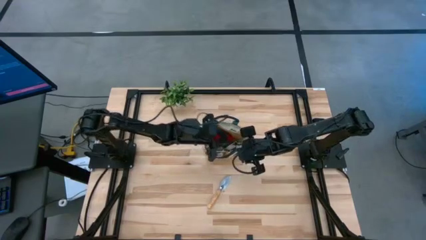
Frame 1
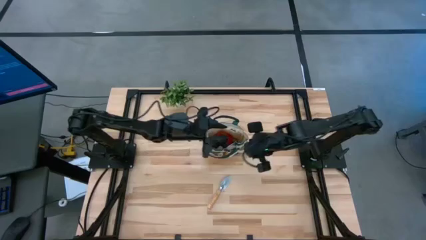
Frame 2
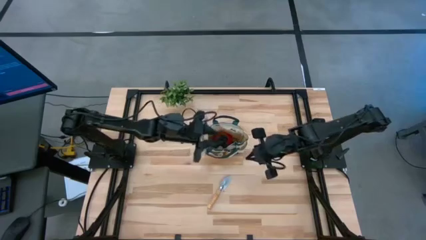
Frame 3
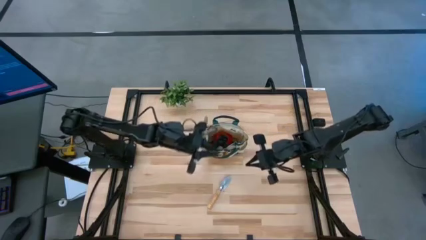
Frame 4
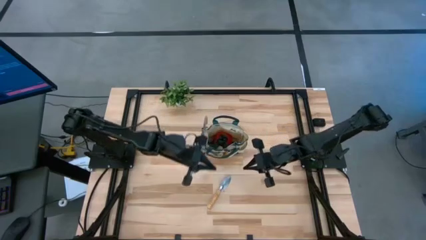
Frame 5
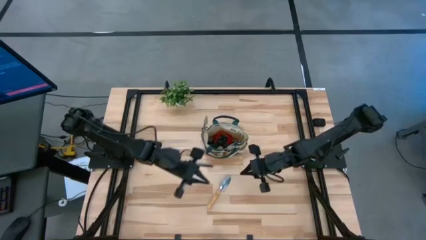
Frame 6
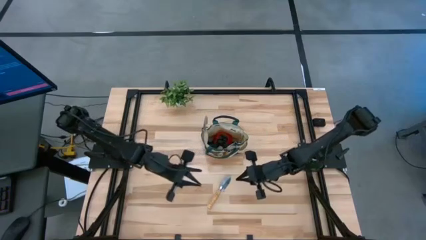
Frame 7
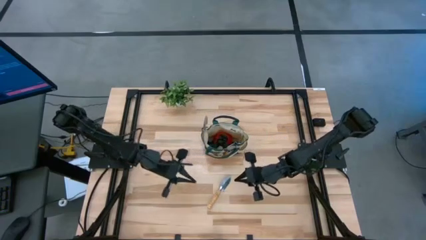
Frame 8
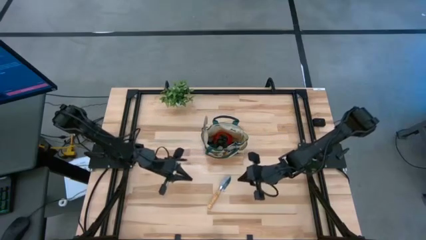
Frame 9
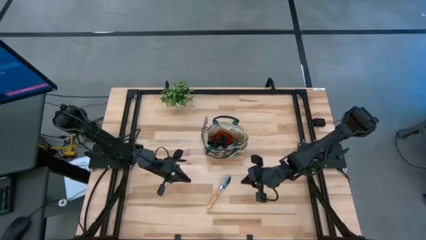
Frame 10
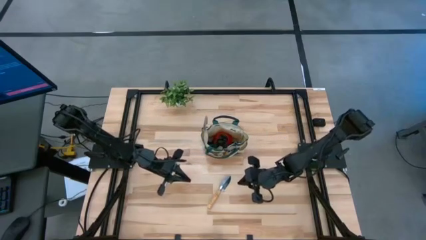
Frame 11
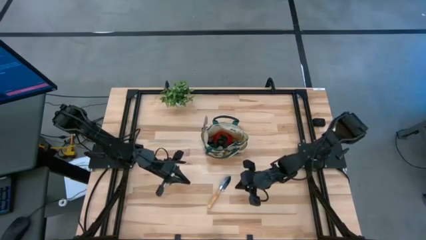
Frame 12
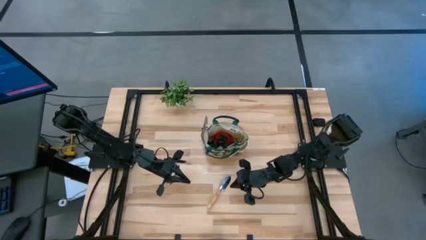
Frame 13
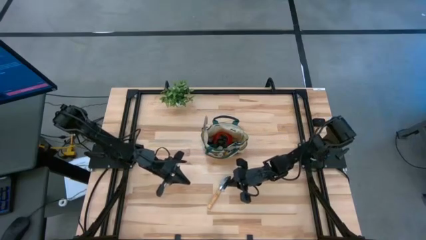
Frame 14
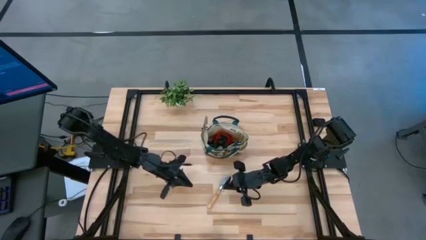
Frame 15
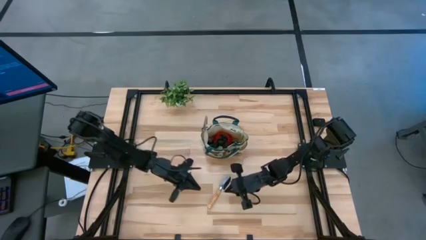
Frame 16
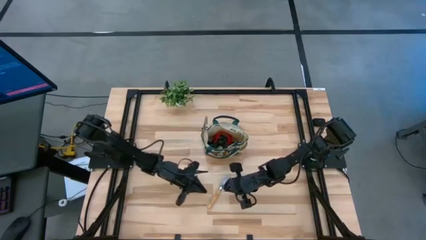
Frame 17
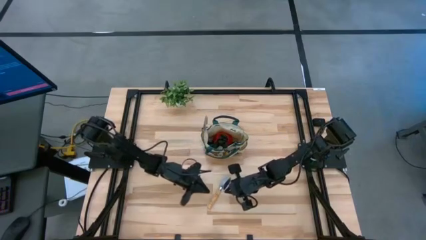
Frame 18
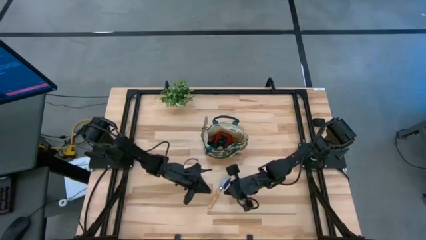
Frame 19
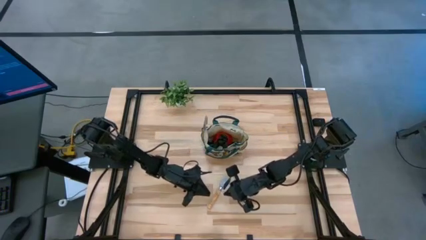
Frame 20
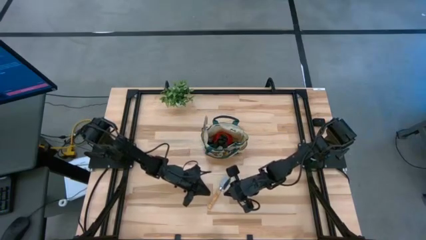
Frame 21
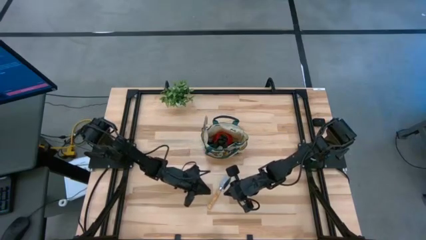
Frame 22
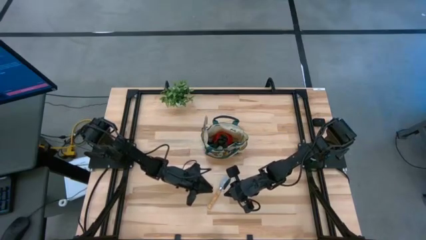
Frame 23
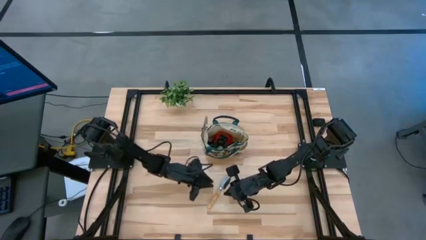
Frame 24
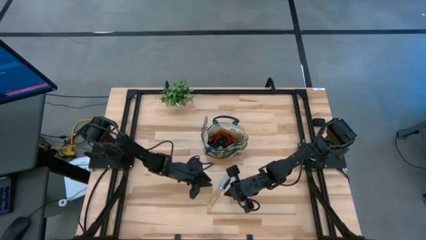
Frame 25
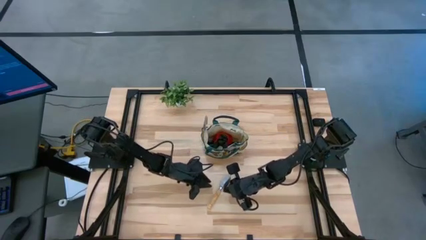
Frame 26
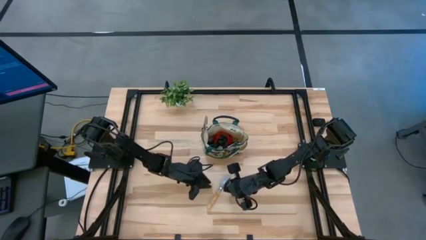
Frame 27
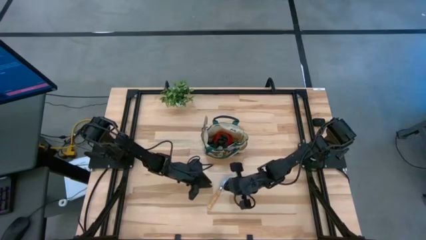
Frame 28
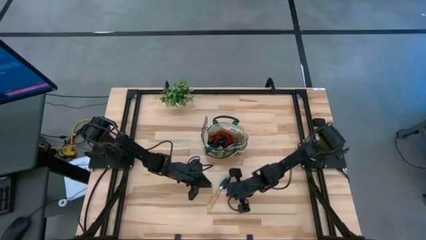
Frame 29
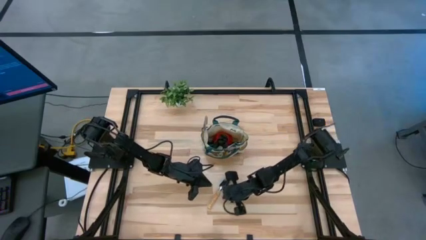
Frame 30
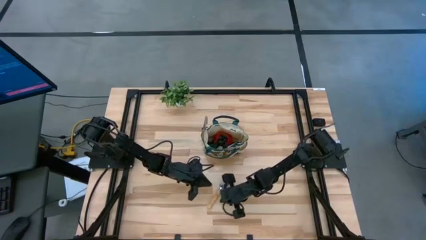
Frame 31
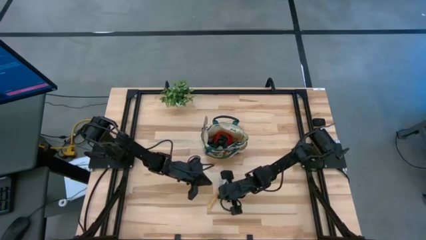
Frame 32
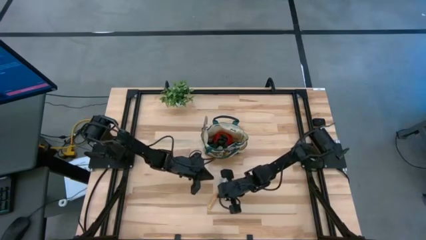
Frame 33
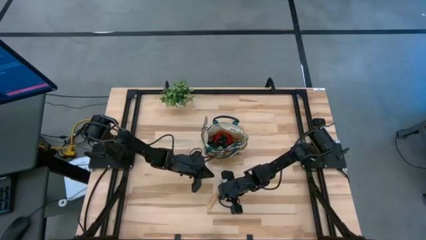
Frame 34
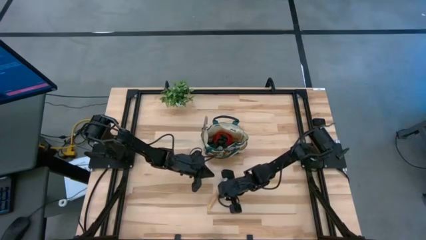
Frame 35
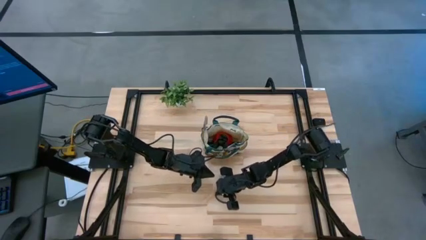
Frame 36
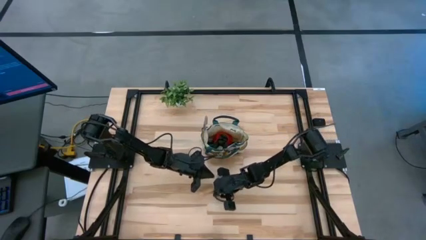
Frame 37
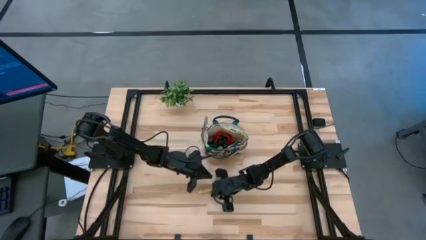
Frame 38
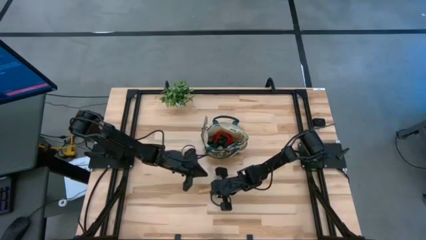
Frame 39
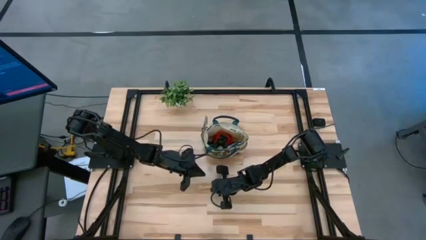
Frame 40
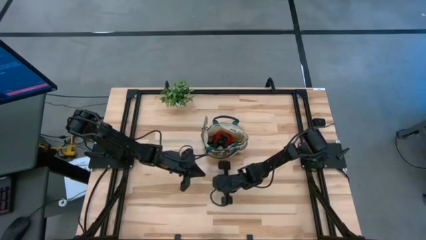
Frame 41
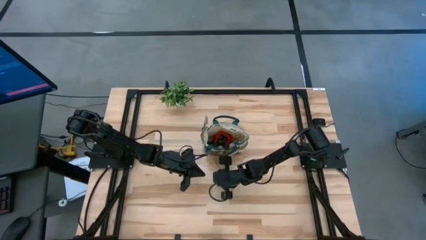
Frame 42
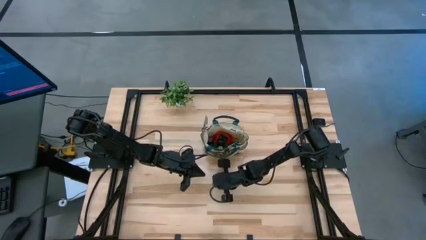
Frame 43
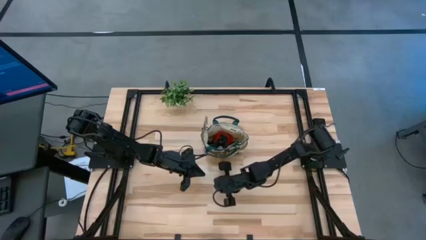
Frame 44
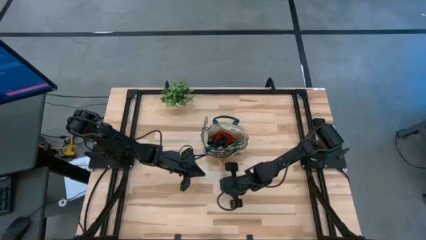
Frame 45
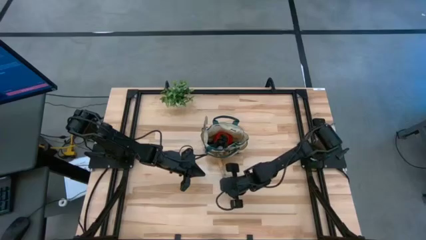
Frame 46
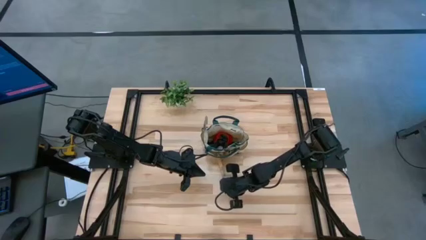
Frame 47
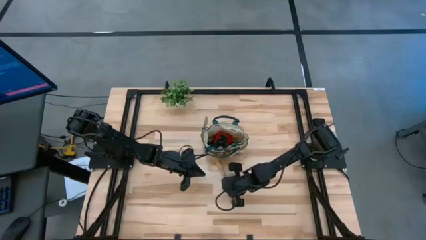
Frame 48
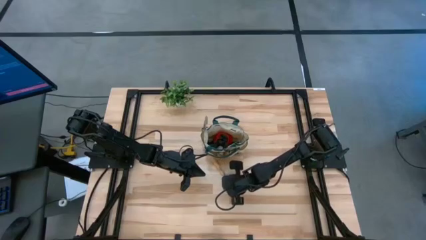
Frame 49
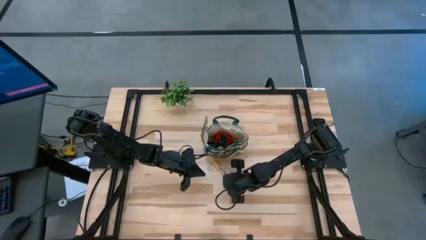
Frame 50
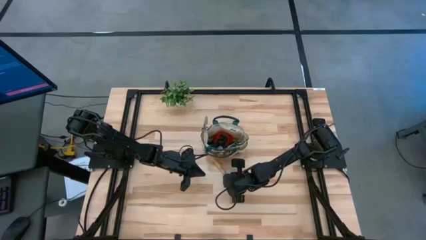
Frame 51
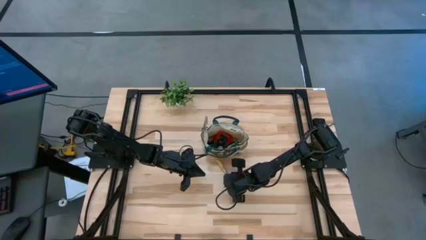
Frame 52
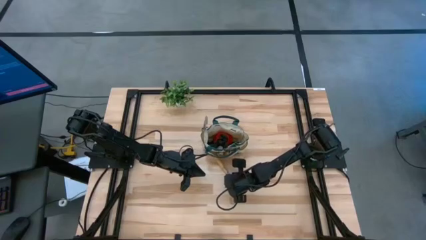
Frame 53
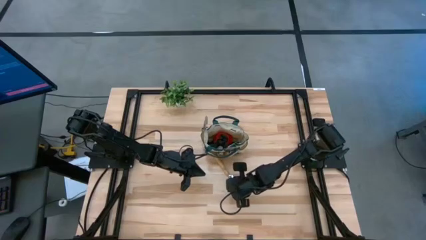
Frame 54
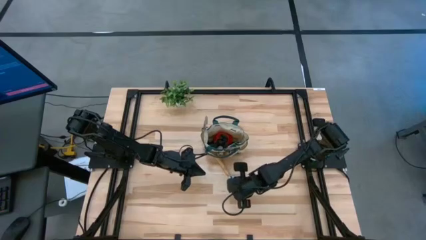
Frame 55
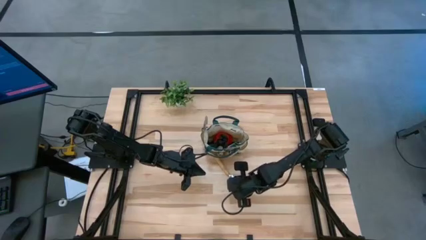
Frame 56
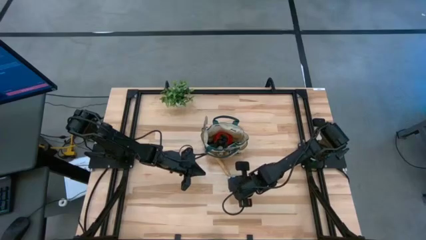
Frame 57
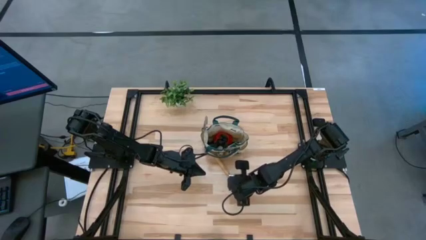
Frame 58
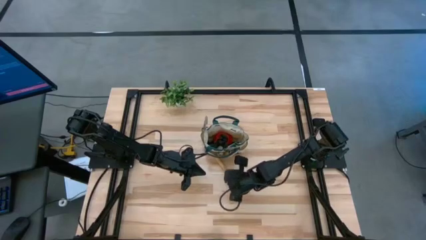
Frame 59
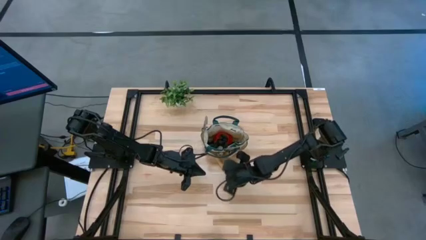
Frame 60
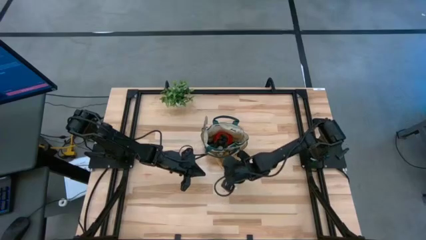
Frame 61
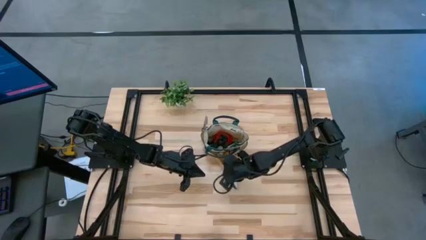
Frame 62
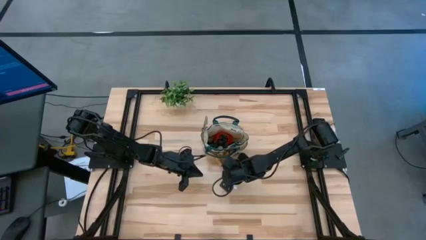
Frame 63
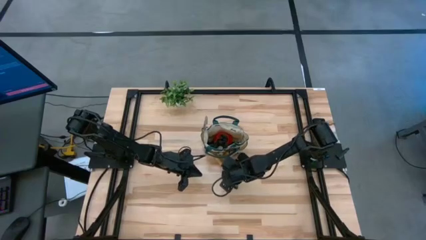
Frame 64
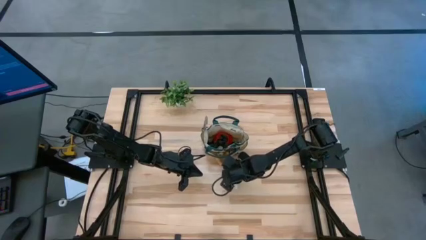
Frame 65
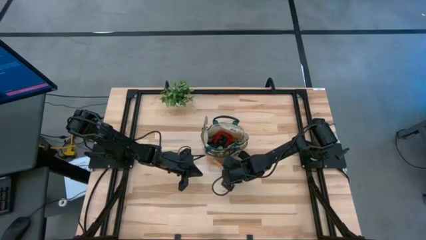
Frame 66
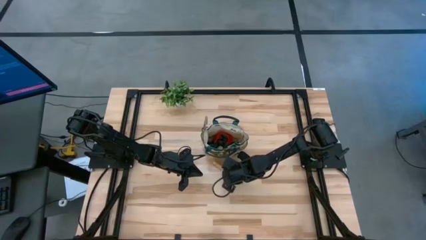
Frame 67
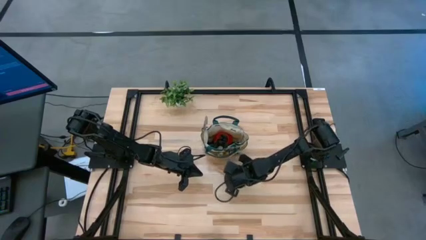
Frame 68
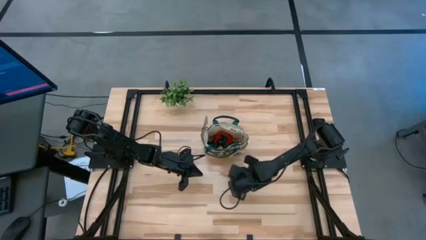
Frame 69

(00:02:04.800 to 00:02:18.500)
Task: Pick & Place Garden tools in Gardening bag
Put the trowel into the gardening bag

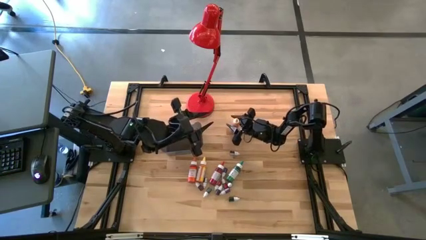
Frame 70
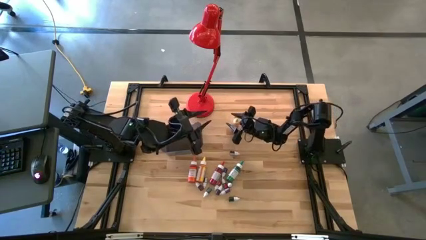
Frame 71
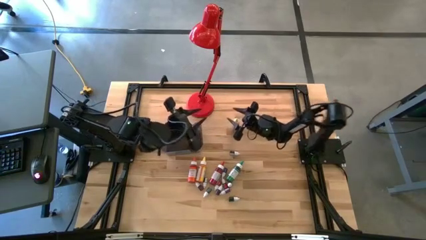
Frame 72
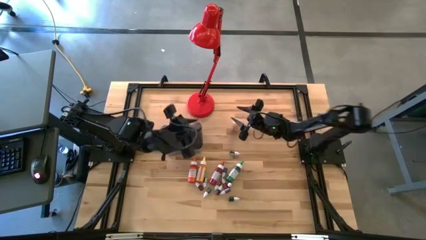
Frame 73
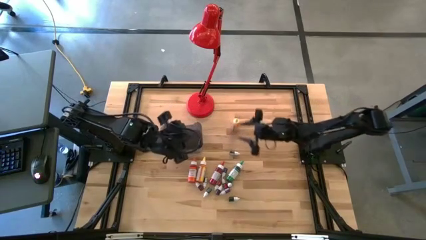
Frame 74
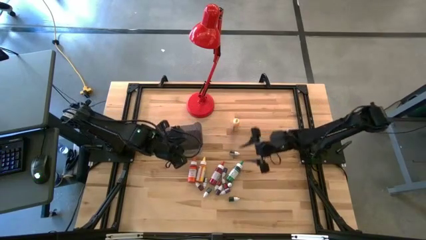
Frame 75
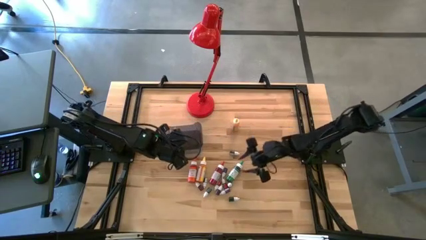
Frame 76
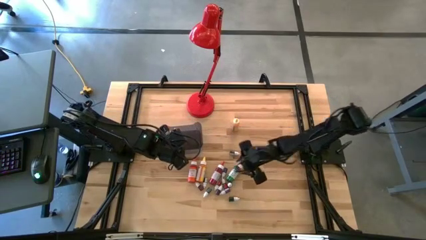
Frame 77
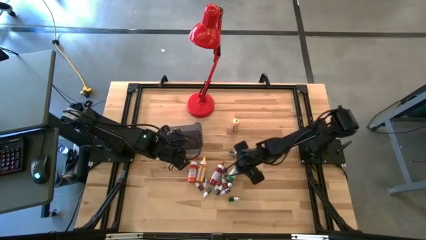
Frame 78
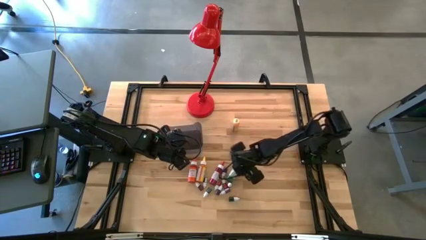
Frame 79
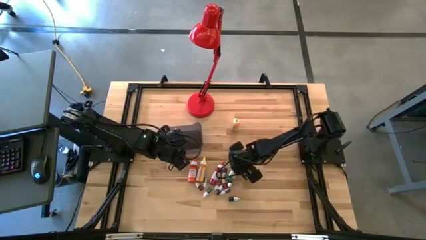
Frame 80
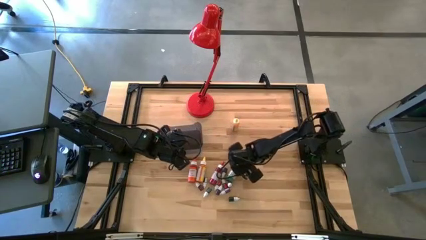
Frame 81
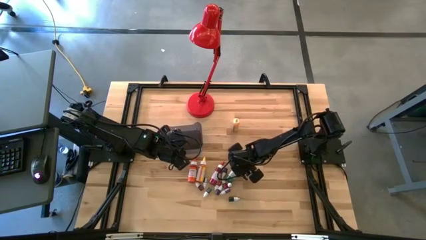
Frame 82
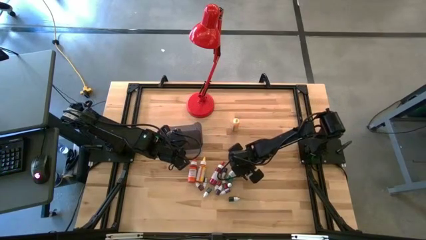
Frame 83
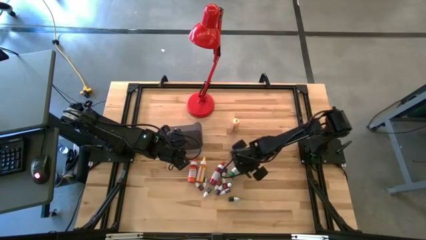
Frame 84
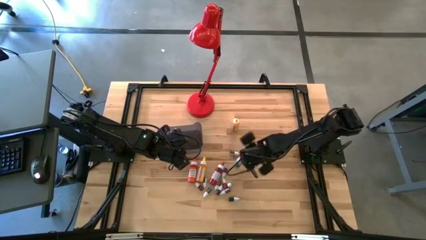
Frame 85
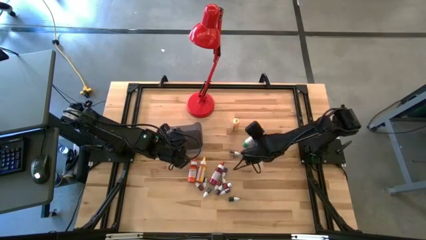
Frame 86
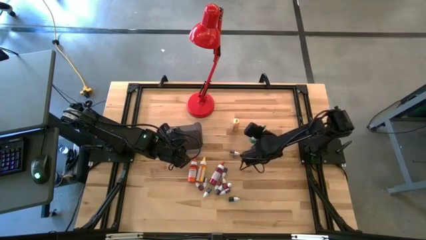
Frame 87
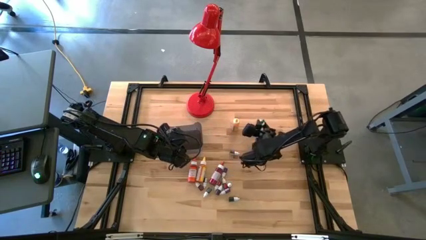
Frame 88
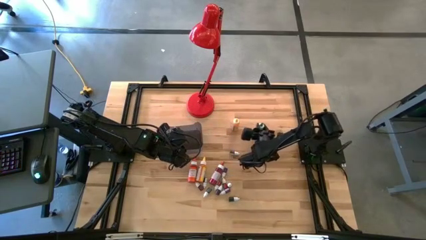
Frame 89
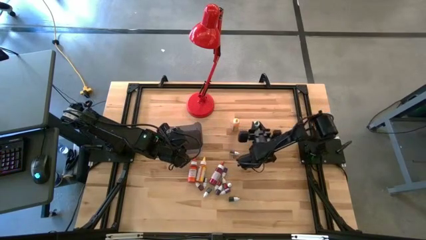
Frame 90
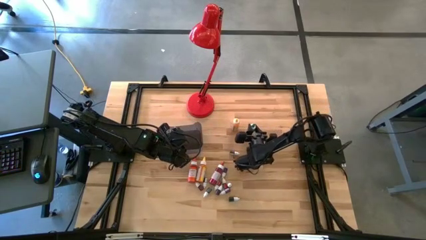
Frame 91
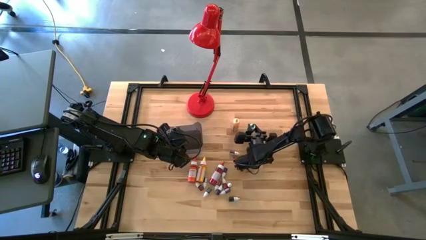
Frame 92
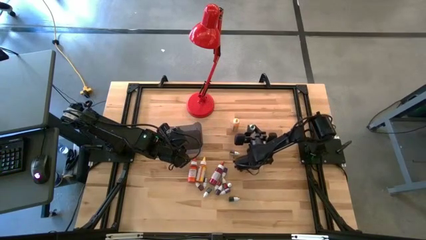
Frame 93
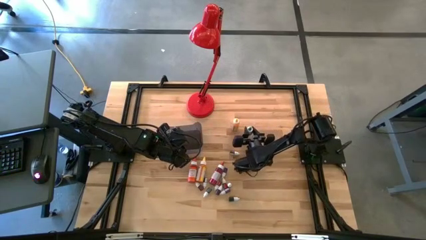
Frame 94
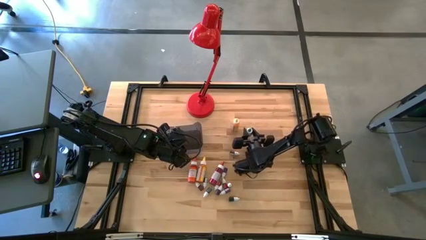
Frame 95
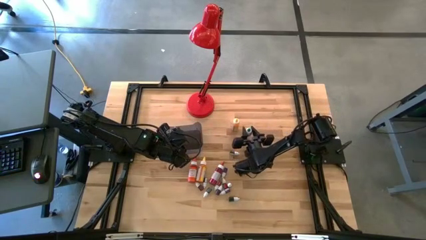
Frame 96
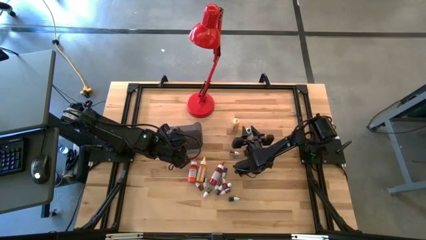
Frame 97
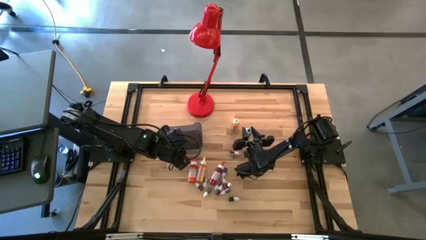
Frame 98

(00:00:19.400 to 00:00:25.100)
Task: Pick & Place food coloring
Move the large green food coloring bottle to the center of the table
